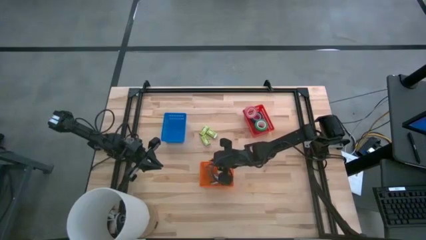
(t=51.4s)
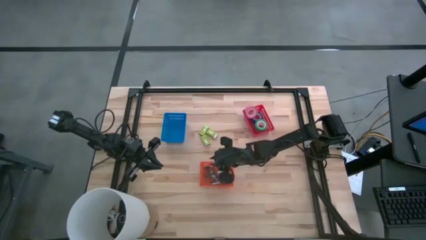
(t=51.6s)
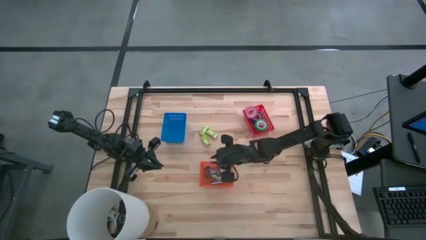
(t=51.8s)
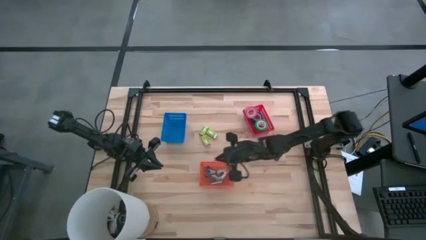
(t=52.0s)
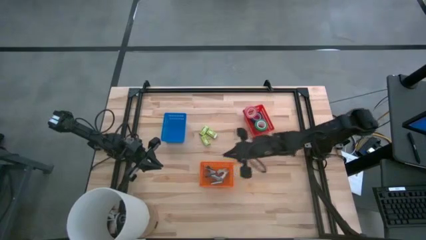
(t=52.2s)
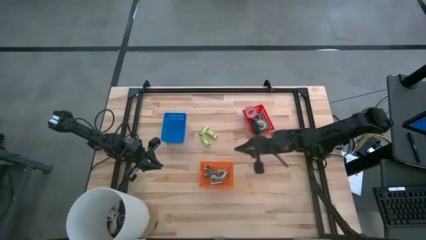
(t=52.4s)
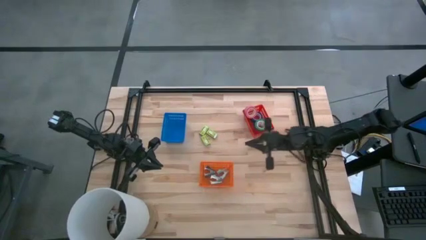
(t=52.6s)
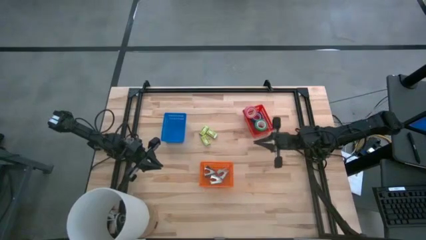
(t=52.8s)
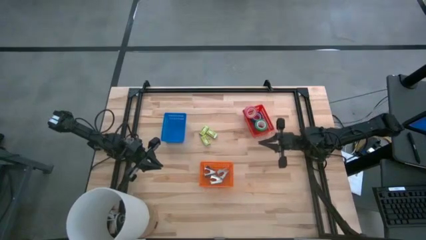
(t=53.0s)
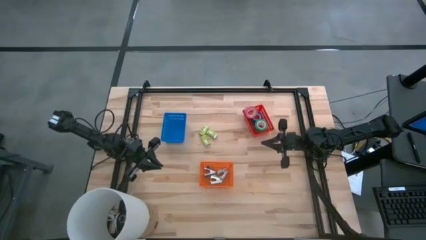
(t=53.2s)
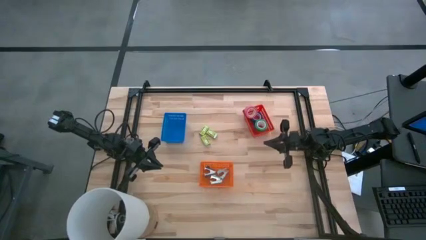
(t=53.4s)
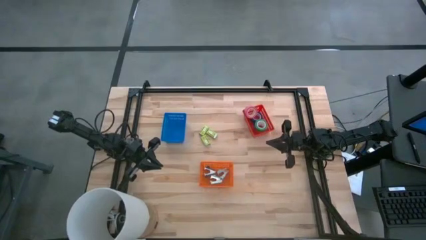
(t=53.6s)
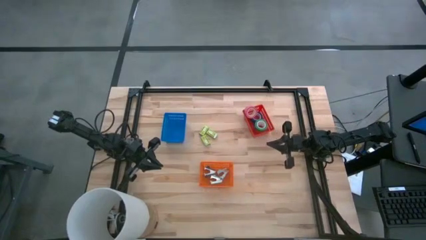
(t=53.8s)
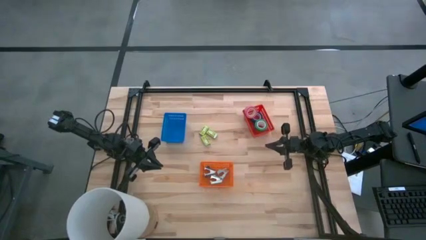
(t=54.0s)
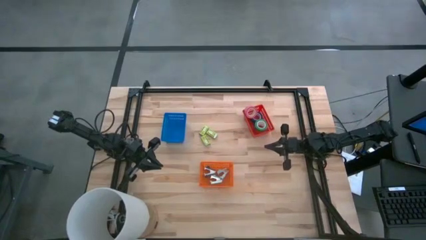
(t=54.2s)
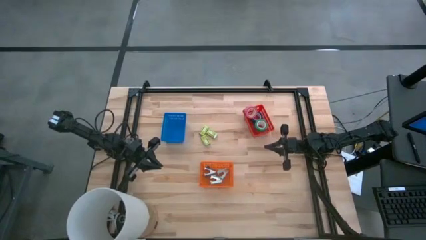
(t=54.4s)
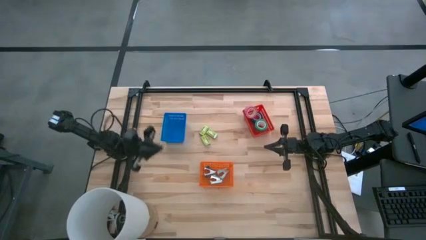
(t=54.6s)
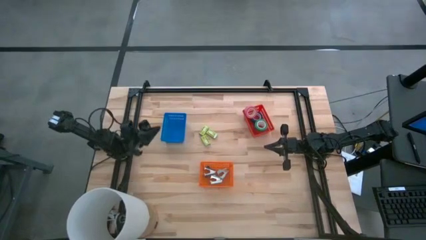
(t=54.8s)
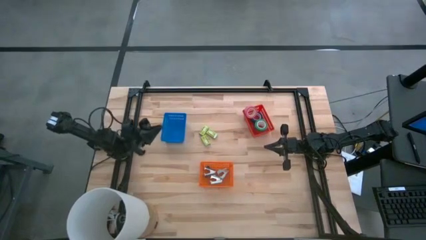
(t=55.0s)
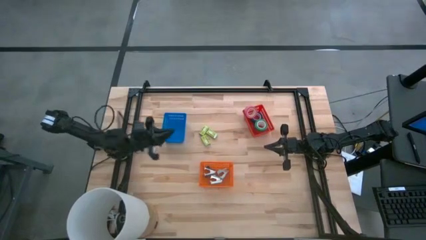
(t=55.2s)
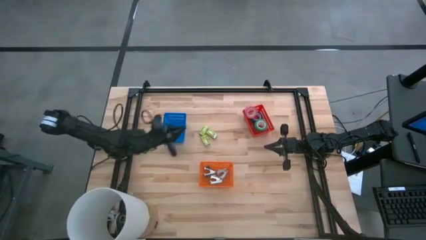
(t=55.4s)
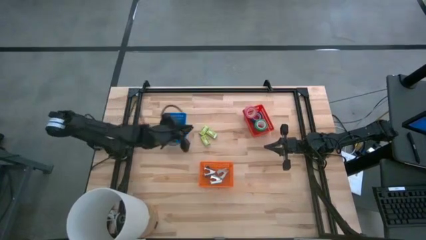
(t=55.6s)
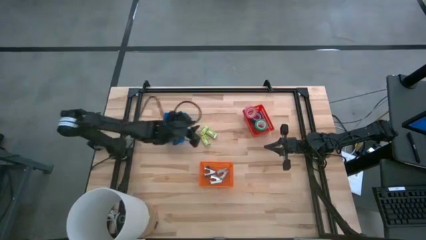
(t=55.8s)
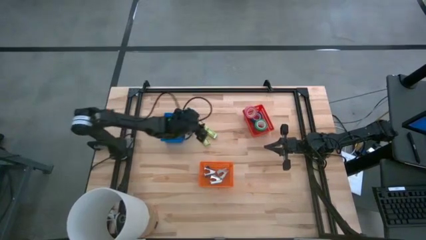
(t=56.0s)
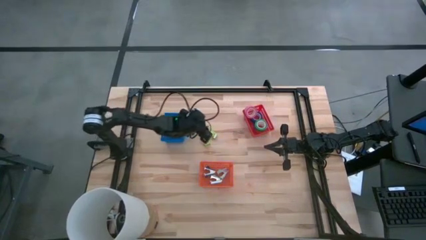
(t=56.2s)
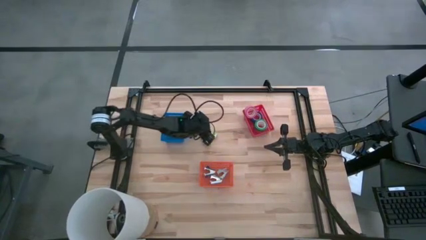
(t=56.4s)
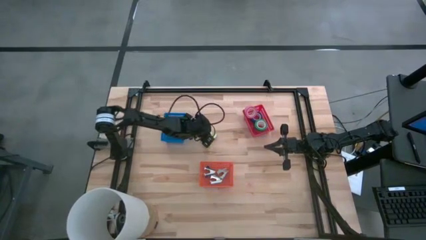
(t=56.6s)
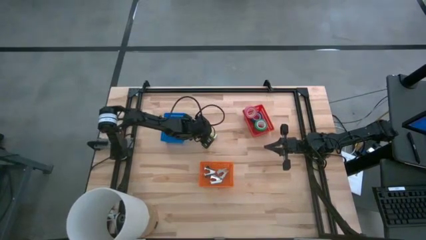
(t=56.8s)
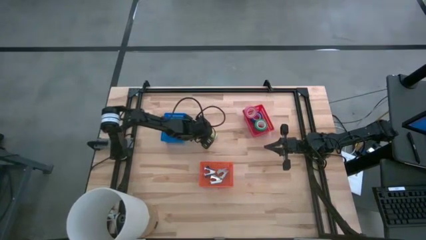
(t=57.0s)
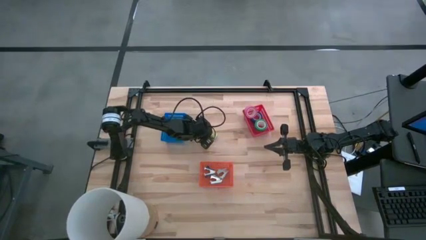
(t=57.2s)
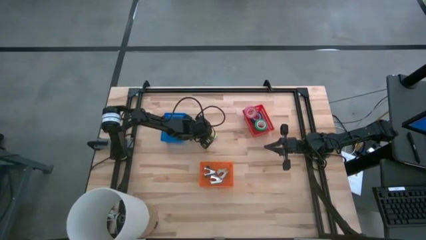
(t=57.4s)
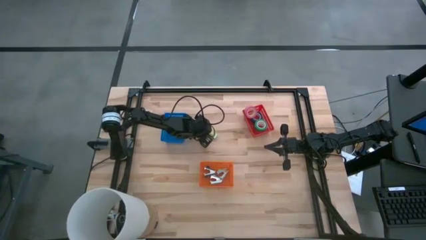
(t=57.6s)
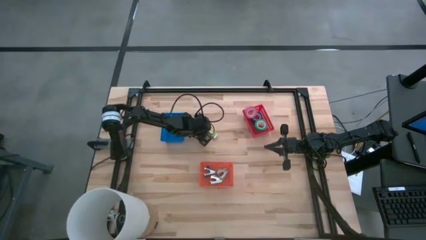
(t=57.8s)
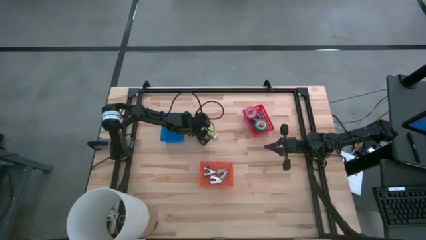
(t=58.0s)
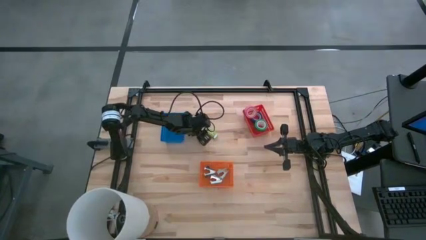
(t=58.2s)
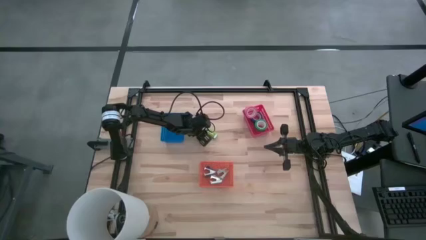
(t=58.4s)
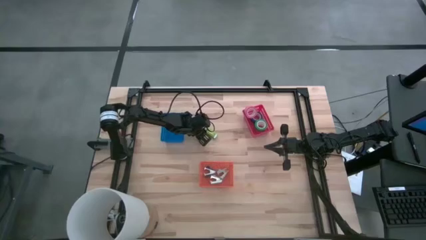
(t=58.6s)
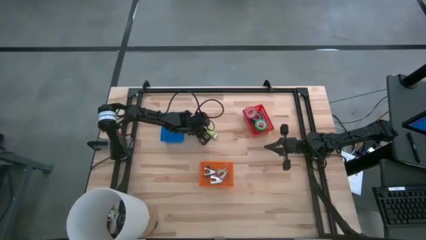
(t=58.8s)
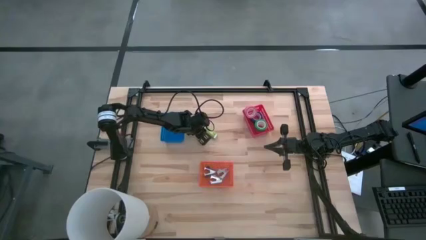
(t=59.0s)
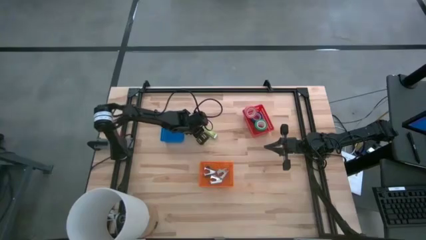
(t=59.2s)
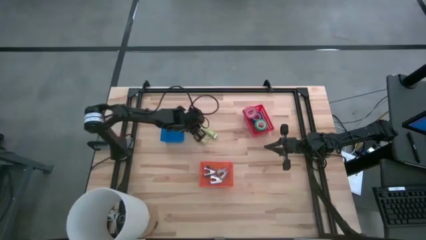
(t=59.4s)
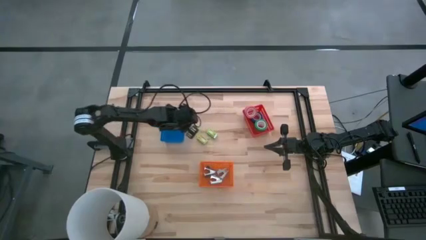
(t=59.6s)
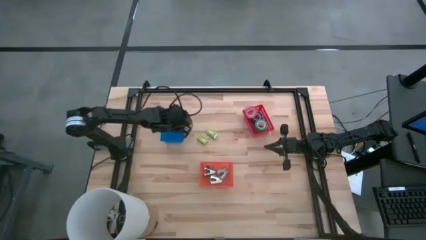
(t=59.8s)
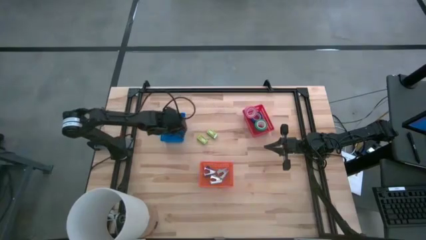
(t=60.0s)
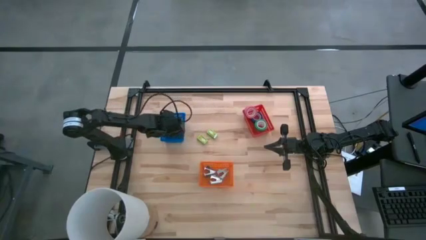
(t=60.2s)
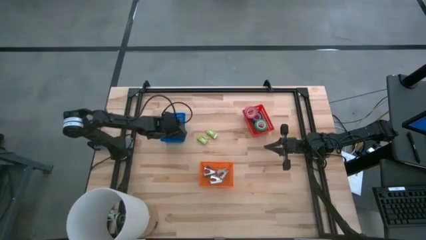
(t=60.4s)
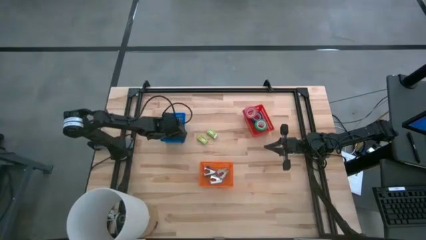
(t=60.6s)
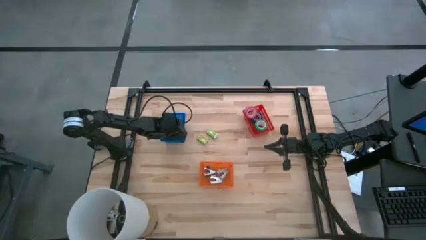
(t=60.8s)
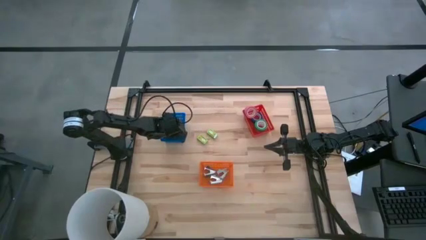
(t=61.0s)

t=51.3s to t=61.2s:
Task: Pick and place Stapler, Stapler remover, tape
Put the top left green staple wire box into the blue basket

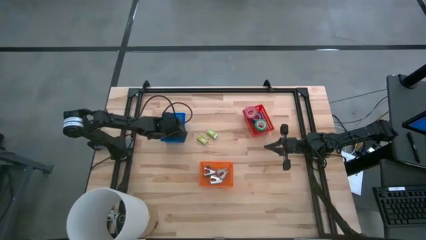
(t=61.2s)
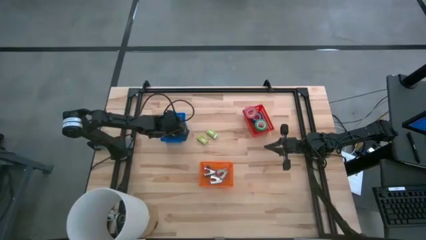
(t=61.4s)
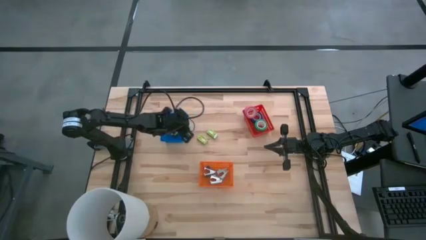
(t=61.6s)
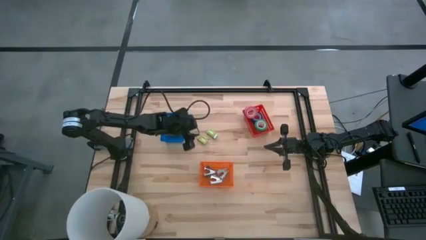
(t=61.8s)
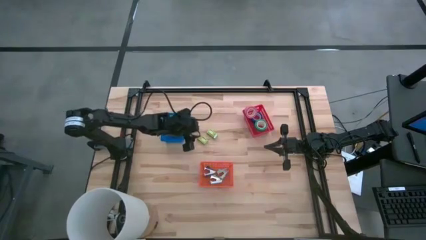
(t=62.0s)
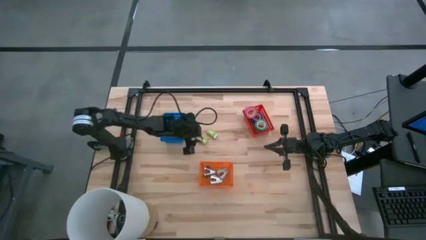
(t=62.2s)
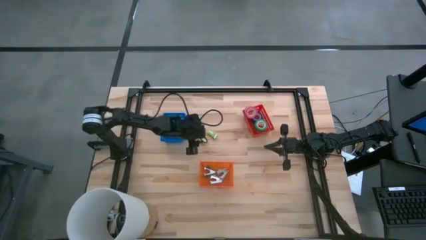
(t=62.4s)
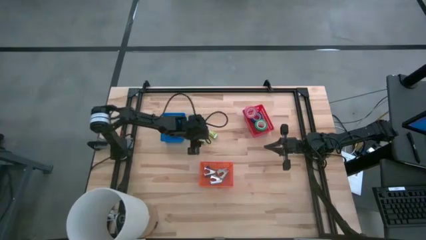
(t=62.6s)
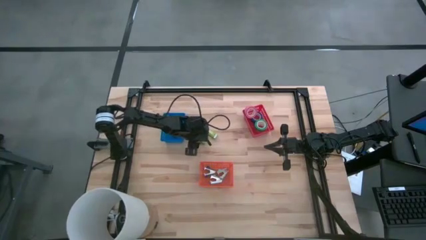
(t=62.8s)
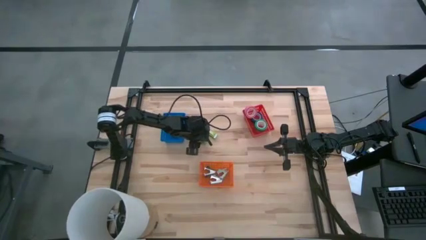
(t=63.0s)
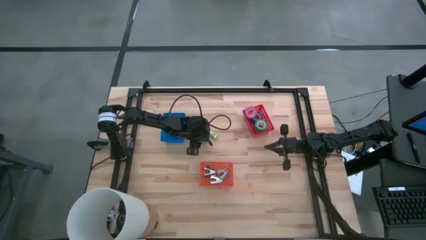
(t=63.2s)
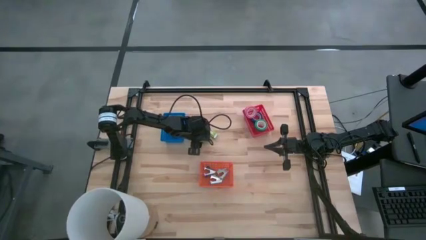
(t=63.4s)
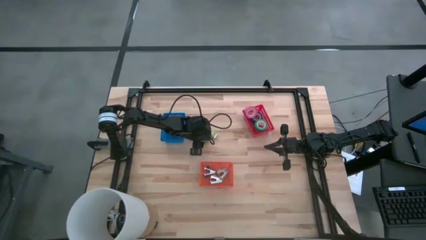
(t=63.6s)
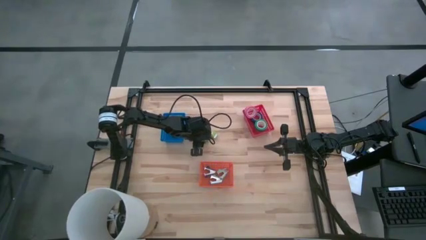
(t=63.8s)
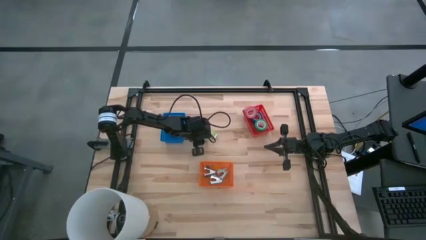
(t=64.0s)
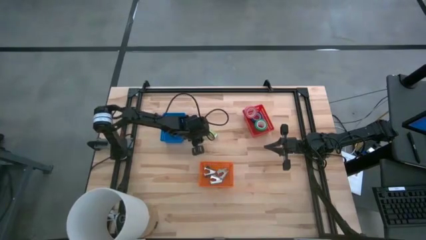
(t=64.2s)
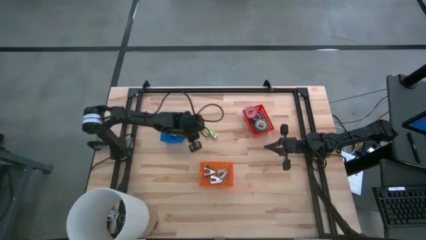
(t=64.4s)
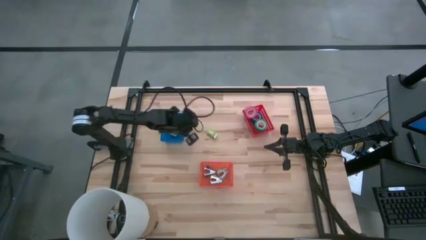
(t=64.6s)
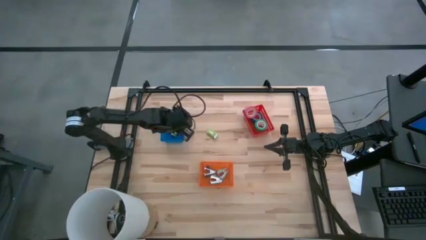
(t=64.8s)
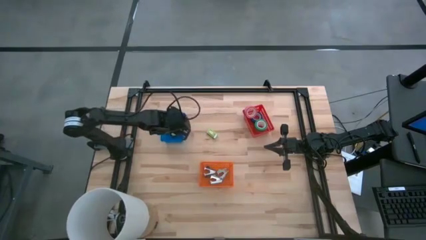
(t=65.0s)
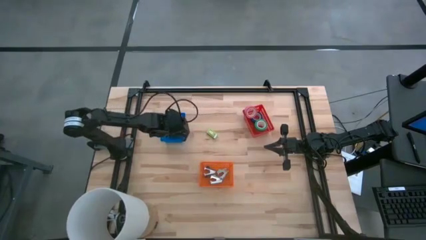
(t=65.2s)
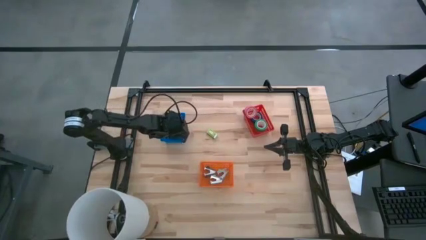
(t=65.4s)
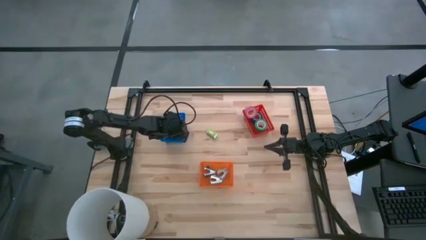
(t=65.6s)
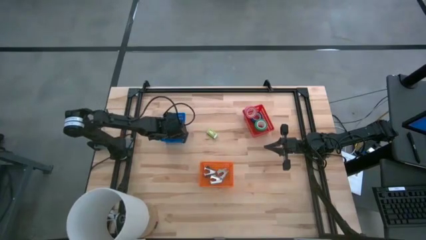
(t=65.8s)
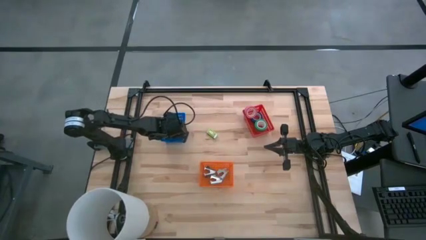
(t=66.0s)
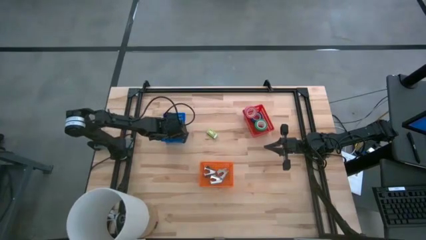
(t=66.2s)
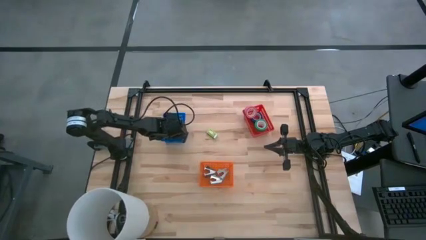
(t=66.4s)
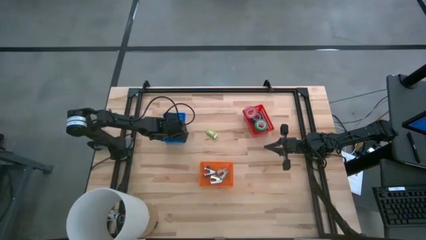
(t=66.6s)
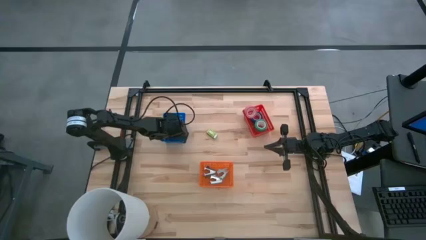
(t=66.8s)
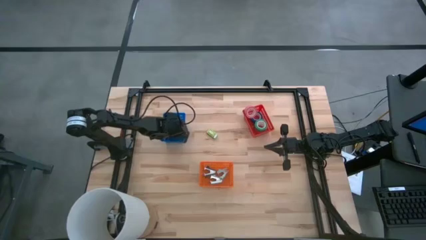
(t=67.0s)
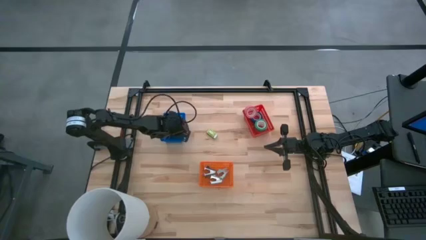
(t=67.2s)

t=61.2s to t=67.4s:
Put the bottom green staple wire box into the blue basket
